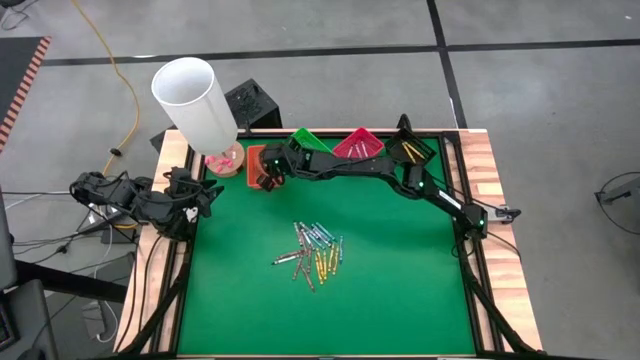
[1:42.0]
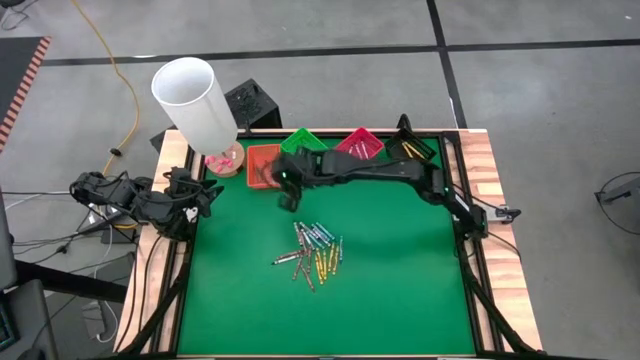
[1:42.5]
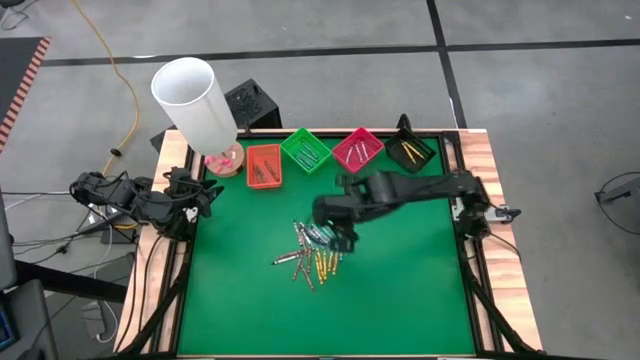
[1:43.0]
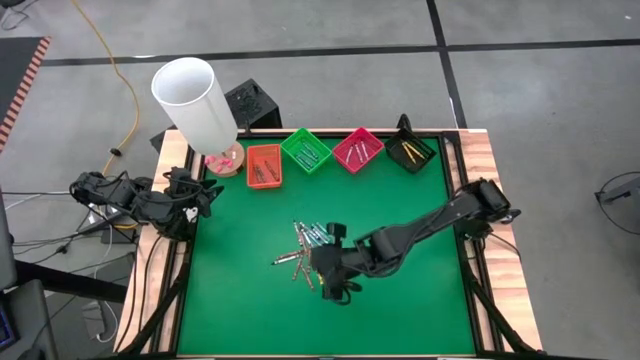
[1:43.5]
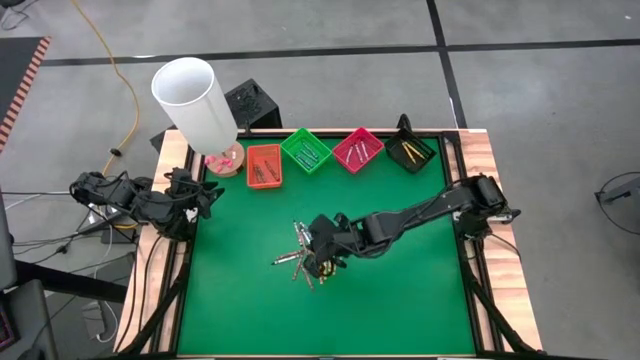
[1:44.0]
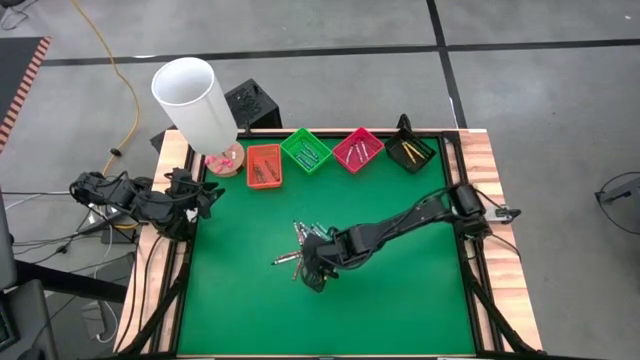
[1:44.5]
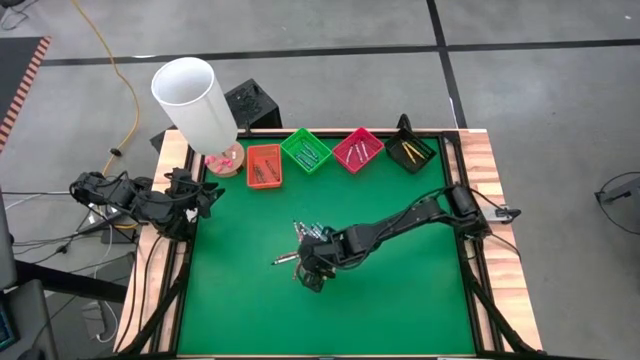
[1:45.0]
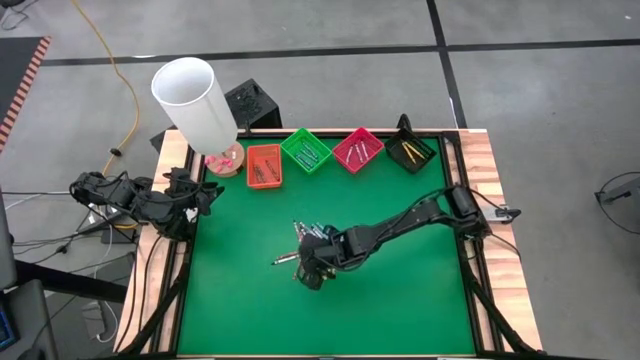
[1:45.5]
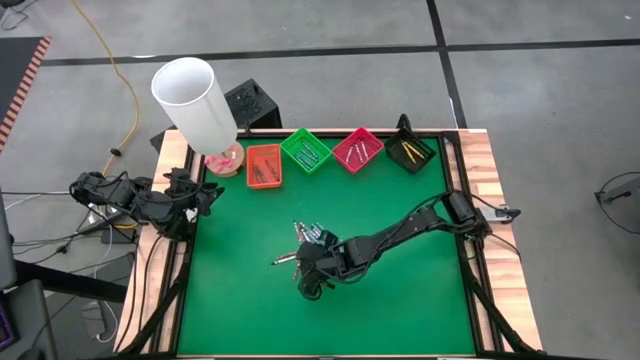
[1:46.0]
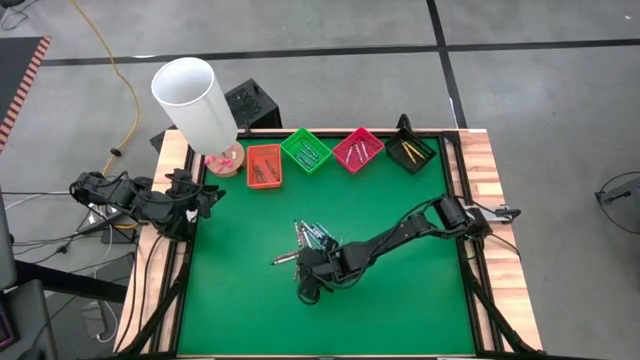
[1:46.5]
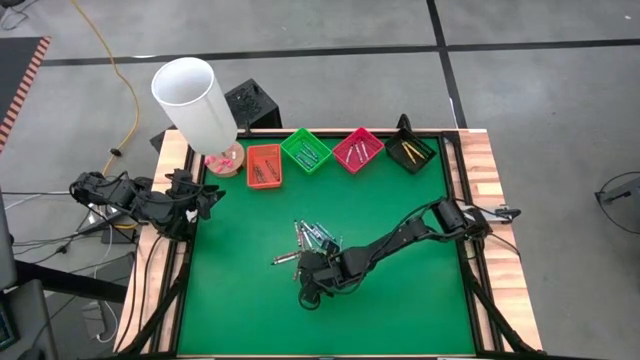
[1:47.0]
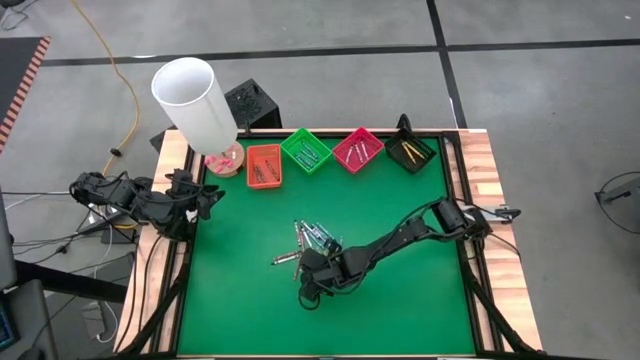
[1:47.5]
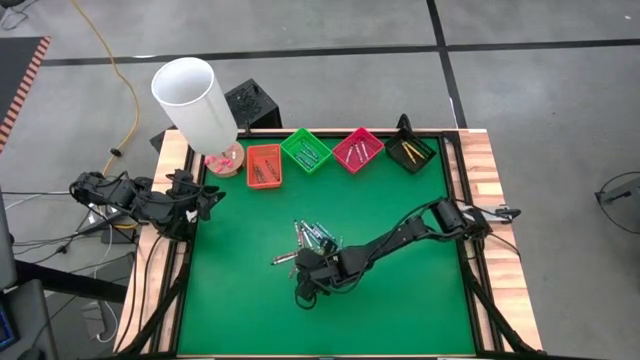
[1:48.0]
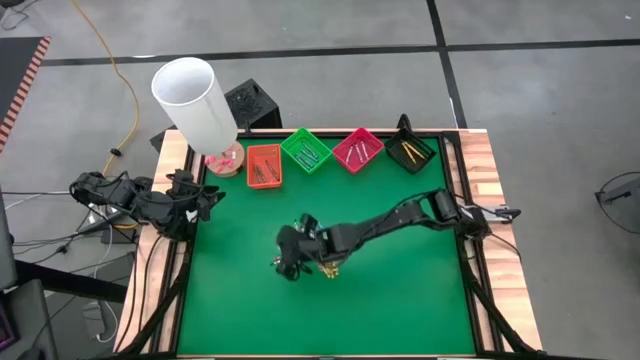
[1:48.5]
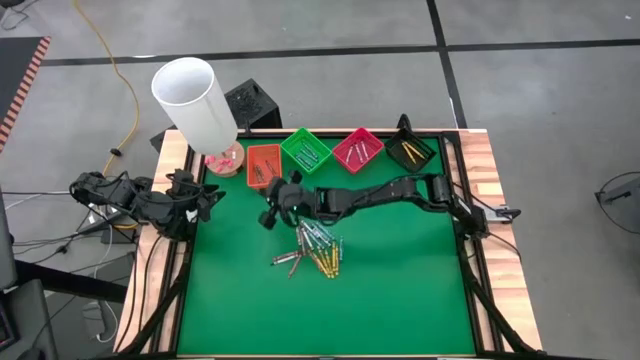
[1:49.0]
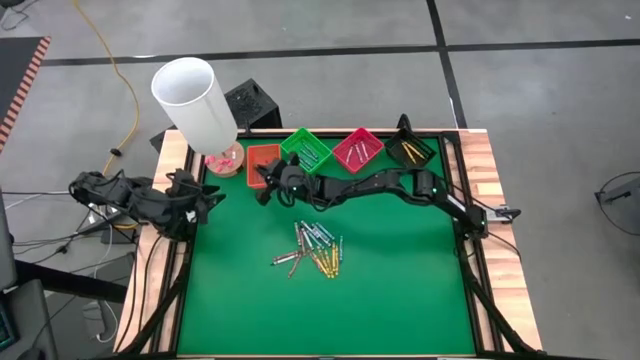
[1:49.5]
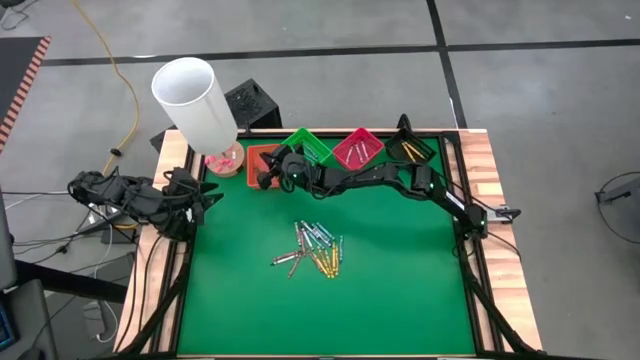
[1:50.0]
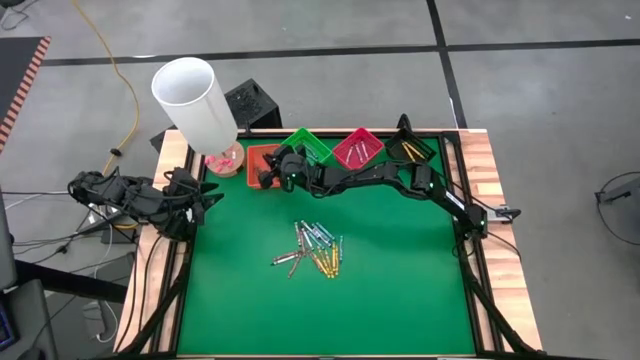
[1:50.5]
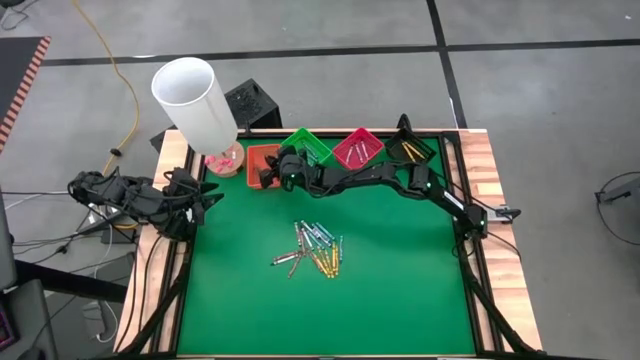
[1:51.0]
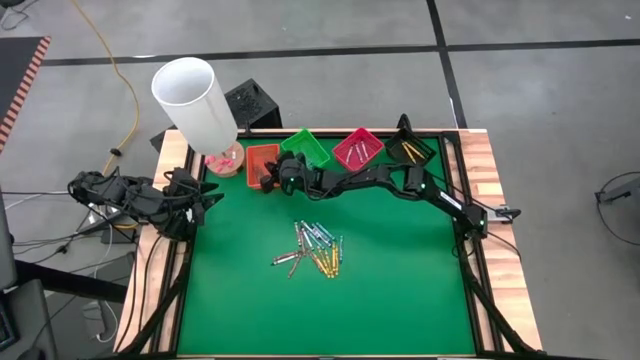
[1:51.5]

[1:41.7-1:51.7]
Task: Sort crayons
Put the brown crayon into the orange bin

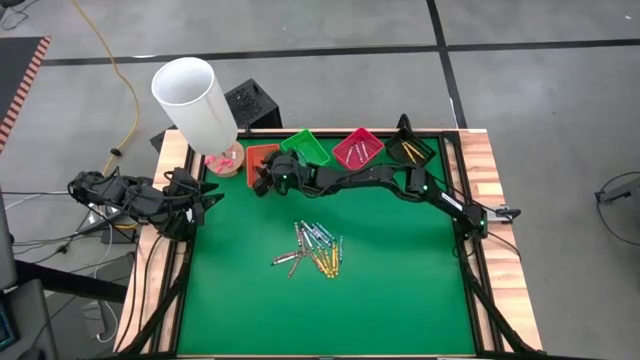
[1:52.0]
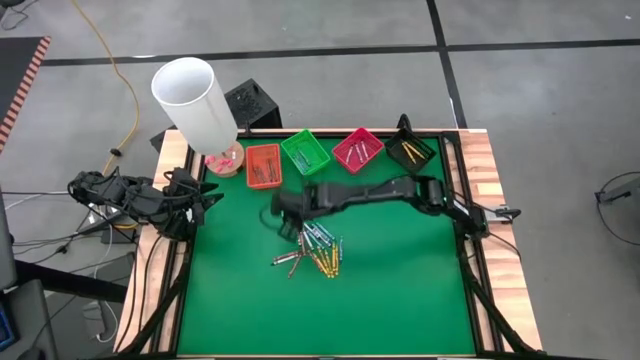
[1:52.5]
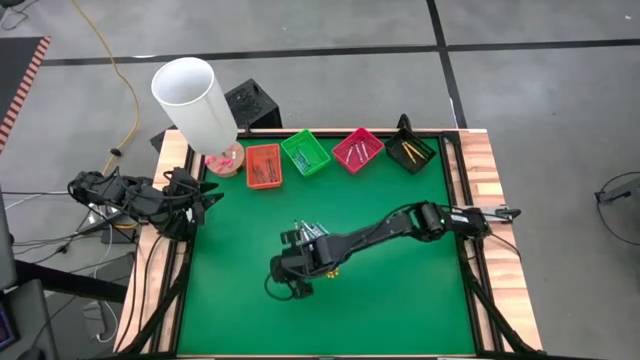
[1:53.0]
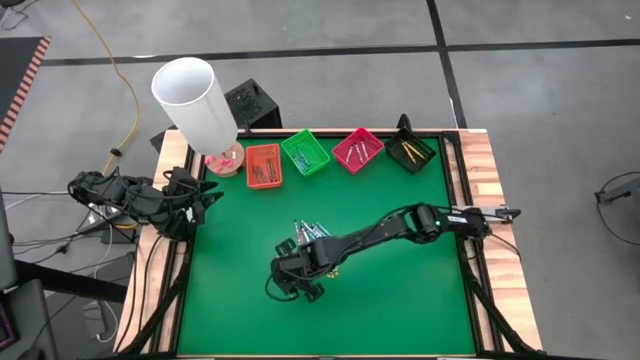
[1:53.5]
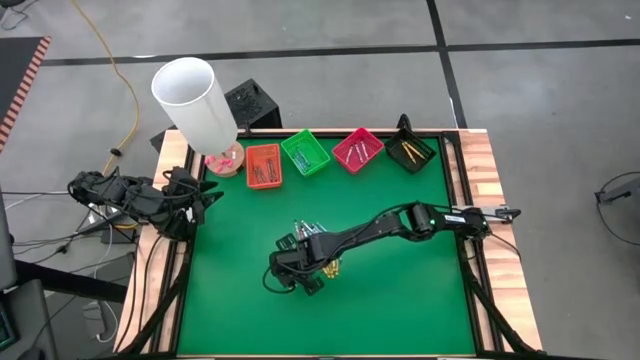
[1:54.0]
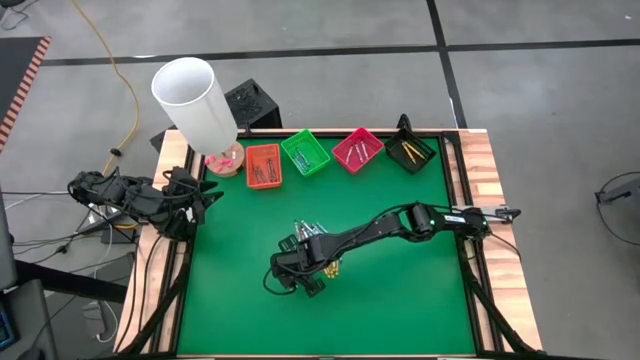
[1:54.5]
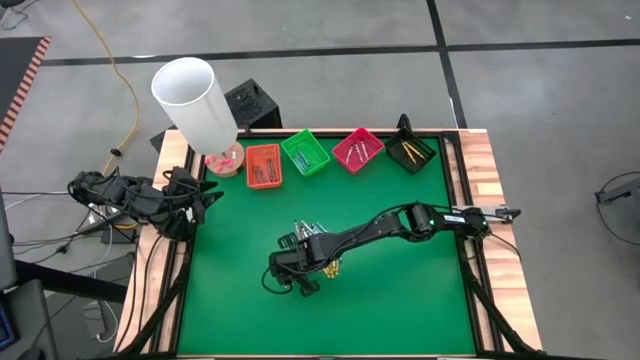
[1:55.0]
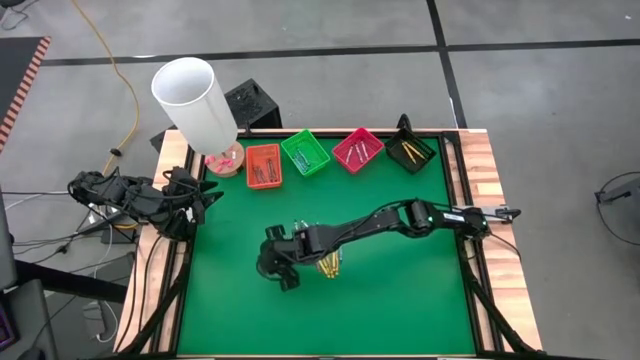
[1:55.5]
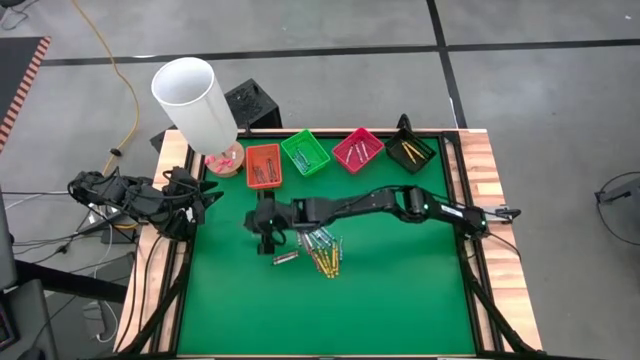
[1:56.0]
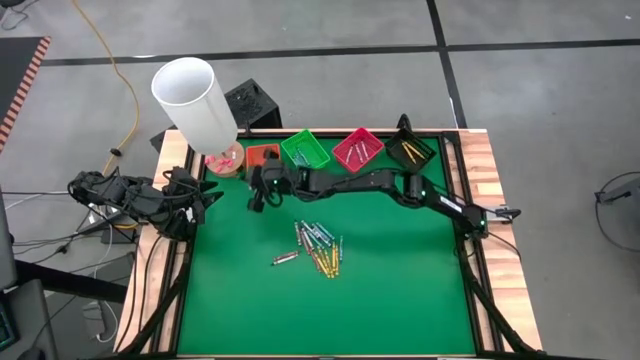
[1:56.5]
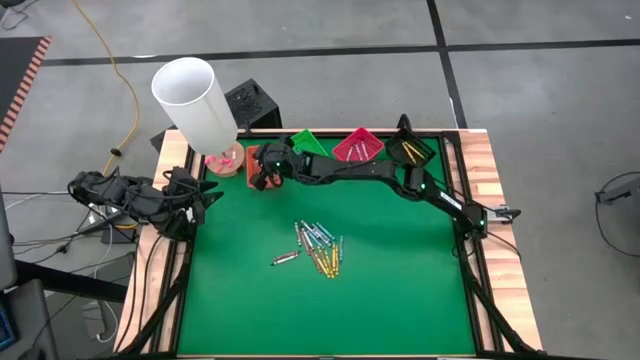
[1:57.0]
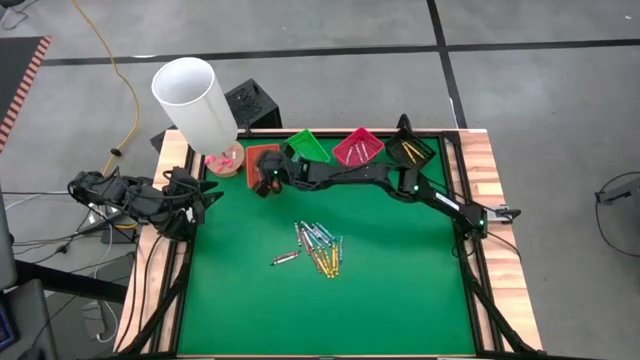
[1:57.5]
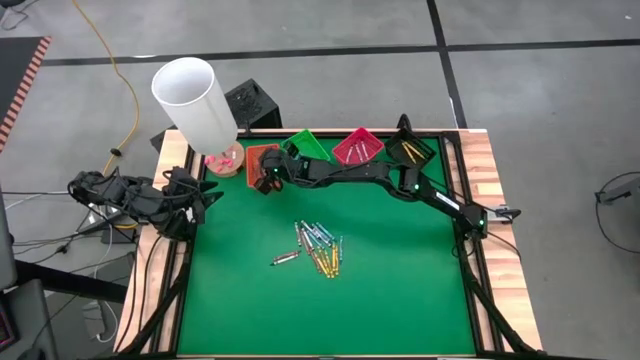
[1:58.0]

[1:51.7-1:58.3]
Put the brown crayon into the orange bin

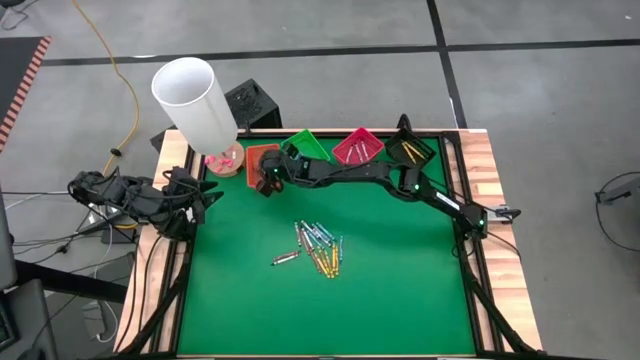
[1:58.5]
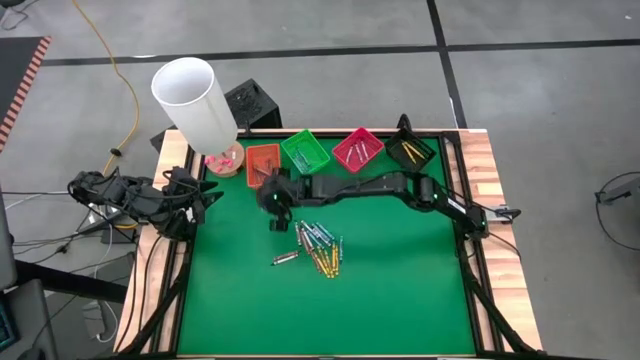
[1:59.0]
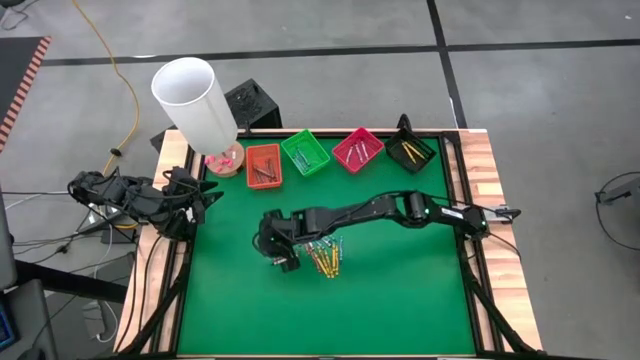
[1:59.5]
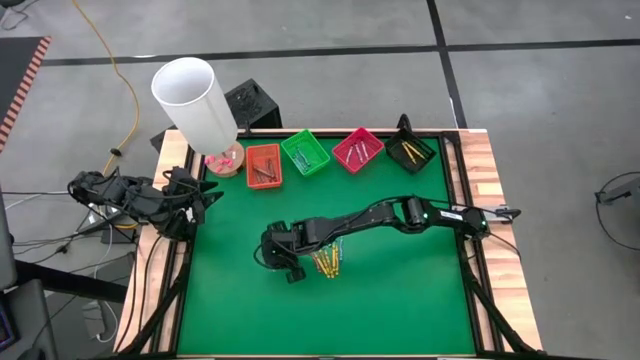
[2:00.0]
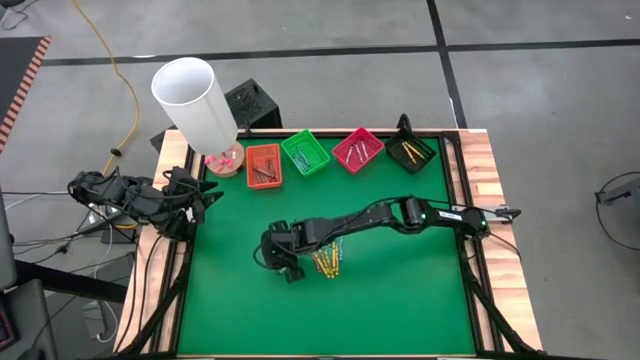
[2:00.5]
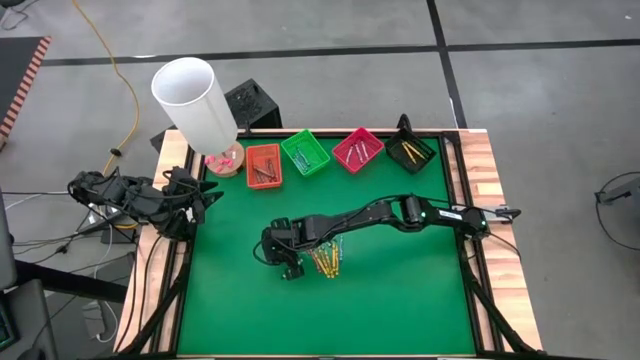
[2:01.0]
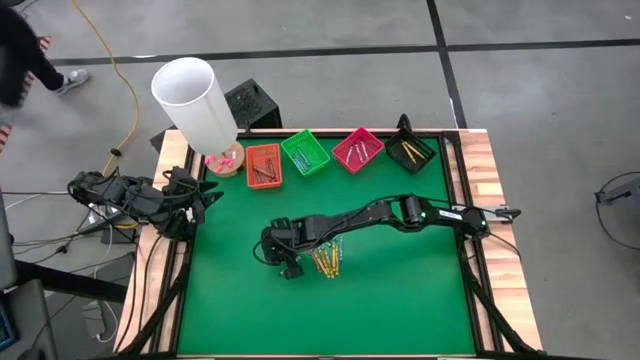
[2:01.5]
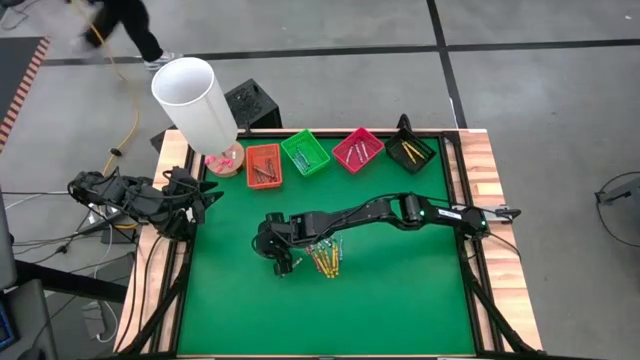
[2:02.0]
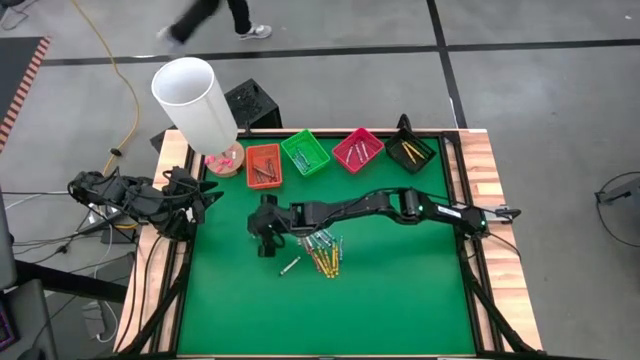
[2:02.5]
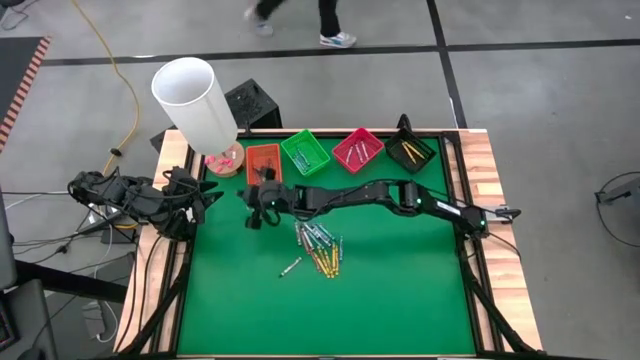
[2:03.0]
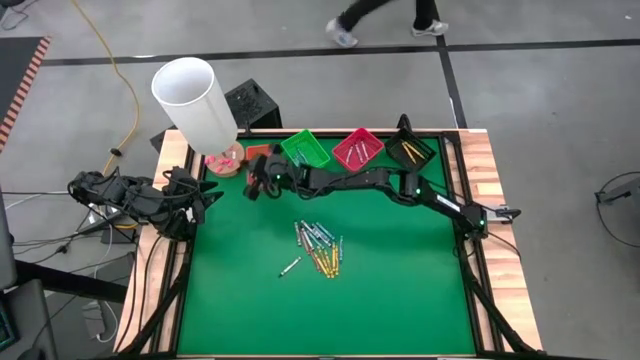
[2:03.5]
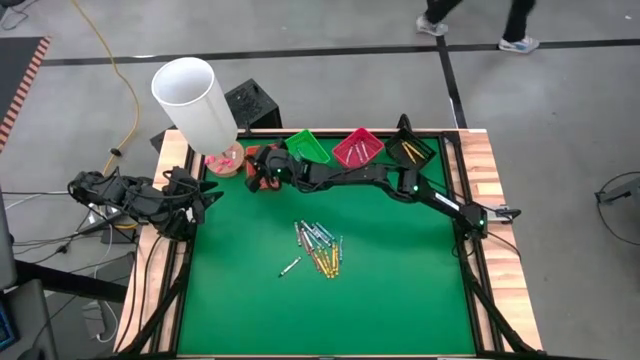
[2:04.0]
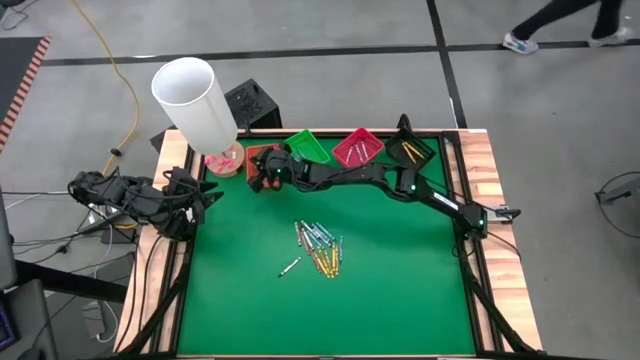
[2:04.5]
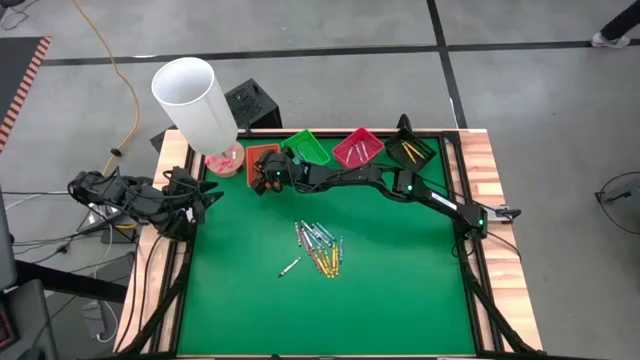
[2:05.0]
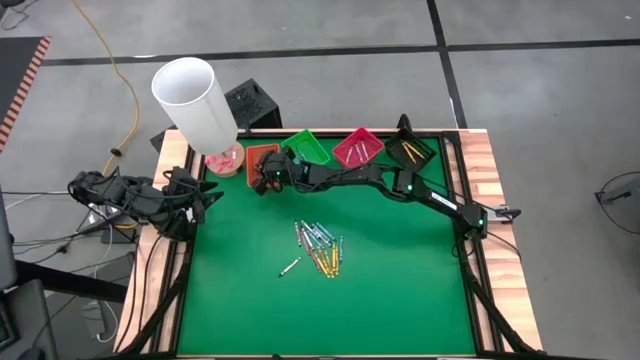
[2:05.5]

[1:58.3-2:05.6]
Put the brown crayon into the orange bin
